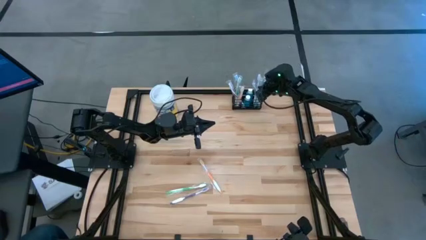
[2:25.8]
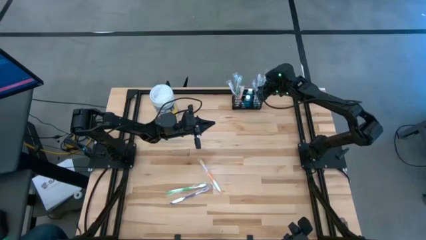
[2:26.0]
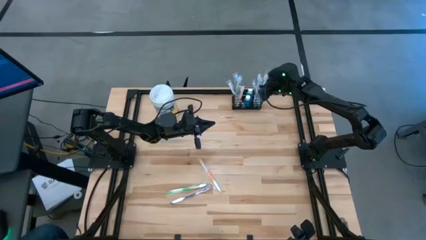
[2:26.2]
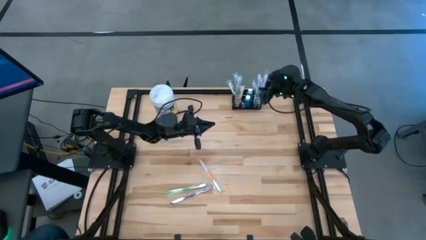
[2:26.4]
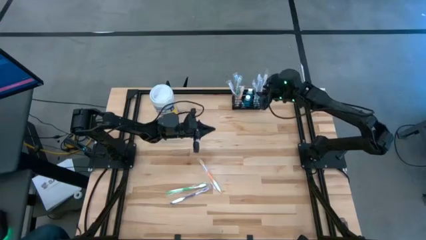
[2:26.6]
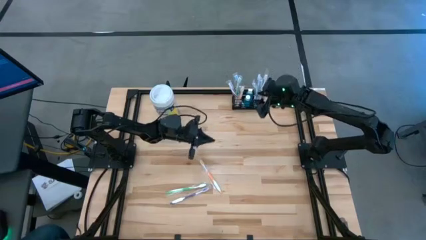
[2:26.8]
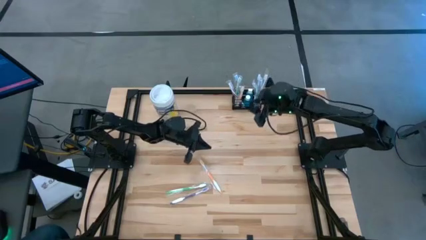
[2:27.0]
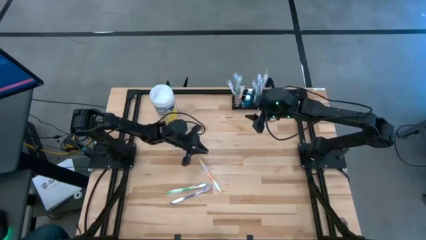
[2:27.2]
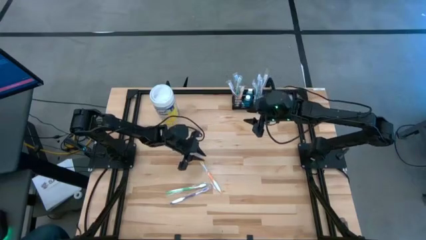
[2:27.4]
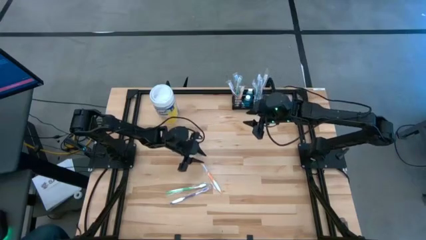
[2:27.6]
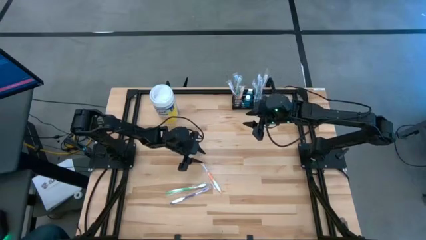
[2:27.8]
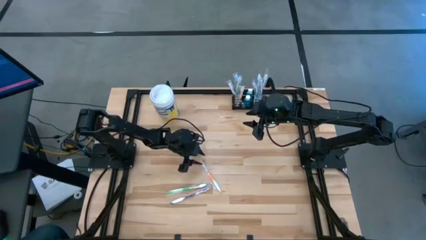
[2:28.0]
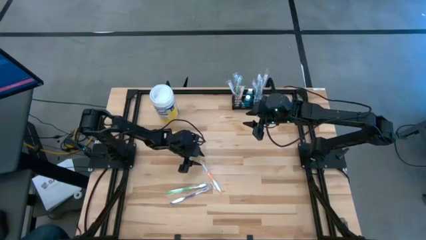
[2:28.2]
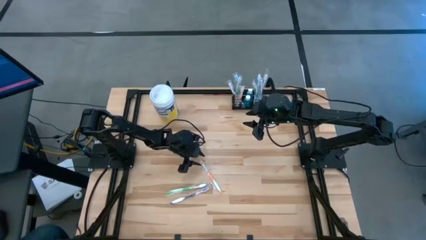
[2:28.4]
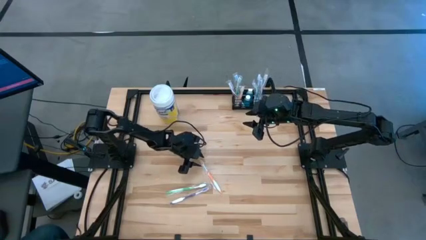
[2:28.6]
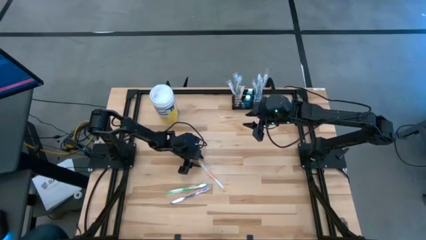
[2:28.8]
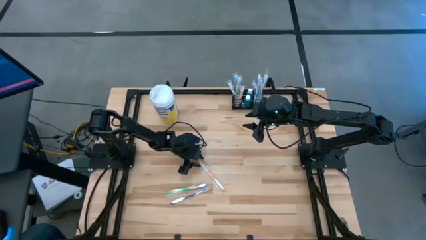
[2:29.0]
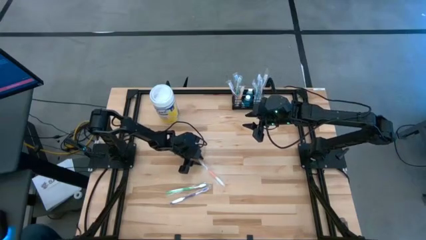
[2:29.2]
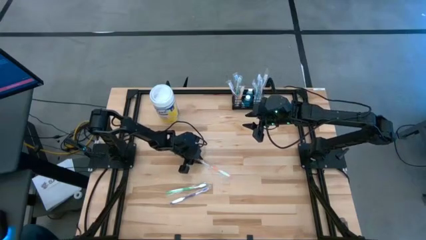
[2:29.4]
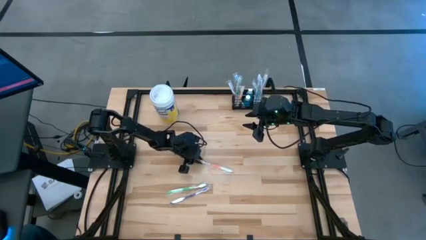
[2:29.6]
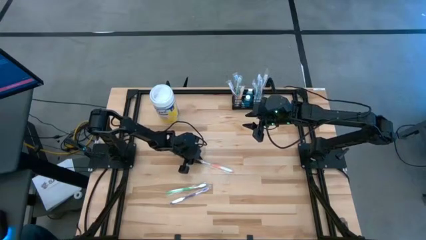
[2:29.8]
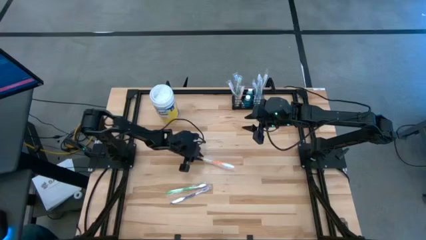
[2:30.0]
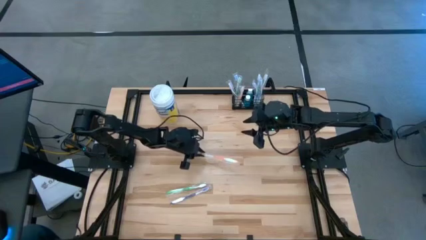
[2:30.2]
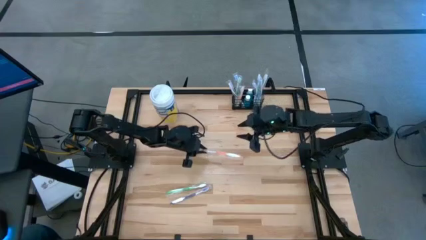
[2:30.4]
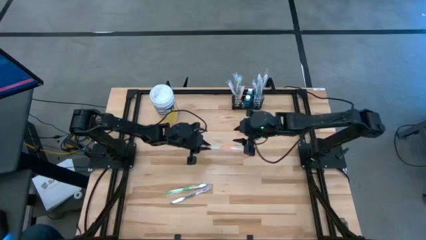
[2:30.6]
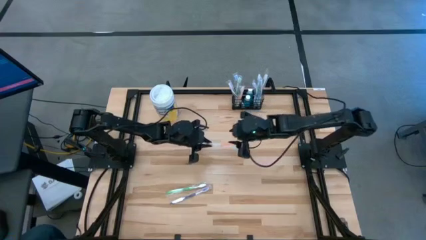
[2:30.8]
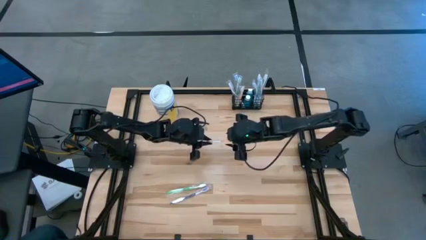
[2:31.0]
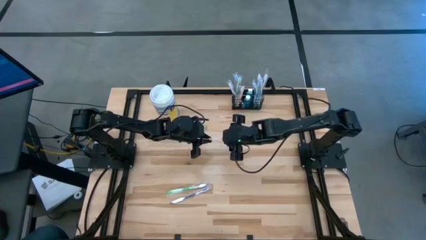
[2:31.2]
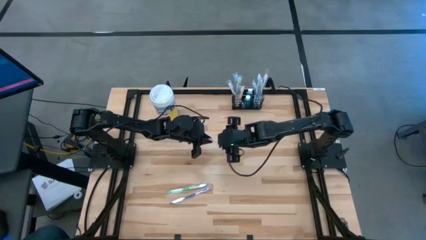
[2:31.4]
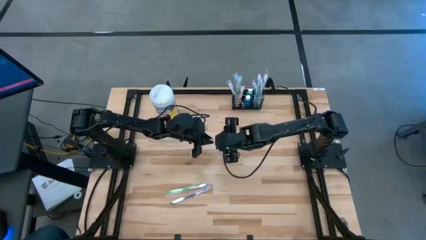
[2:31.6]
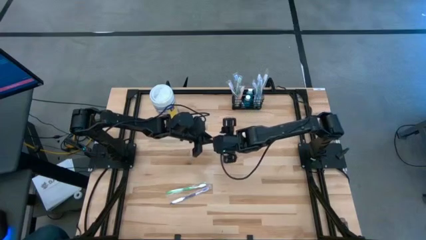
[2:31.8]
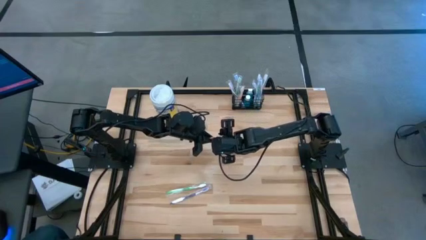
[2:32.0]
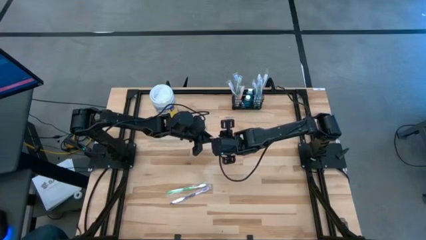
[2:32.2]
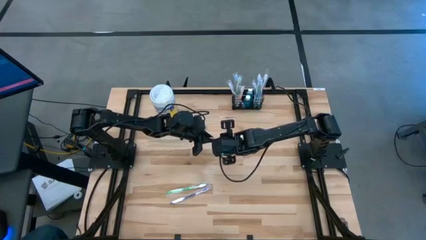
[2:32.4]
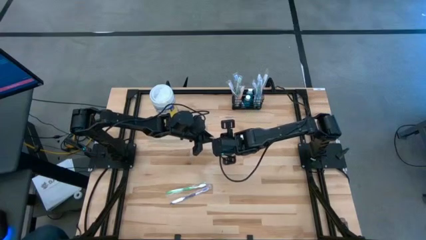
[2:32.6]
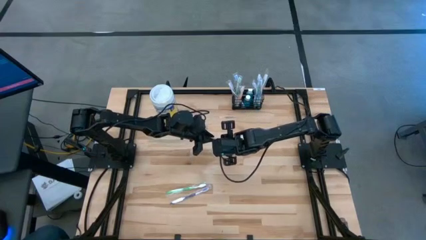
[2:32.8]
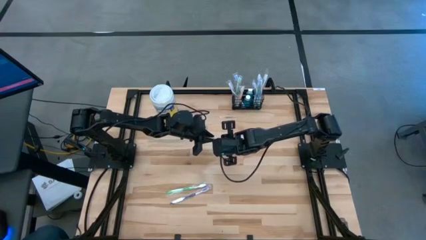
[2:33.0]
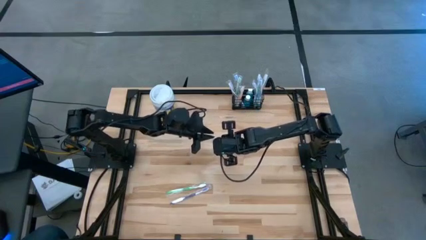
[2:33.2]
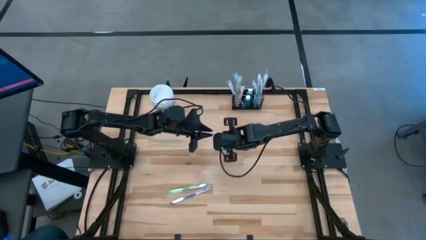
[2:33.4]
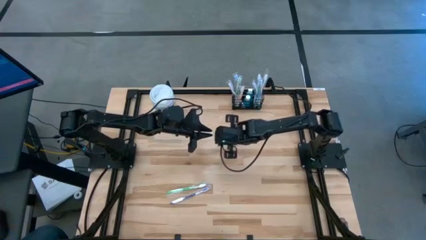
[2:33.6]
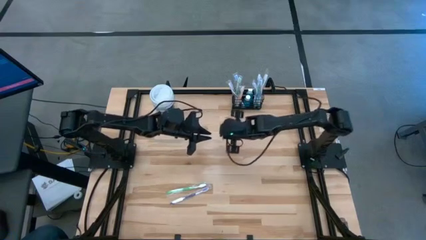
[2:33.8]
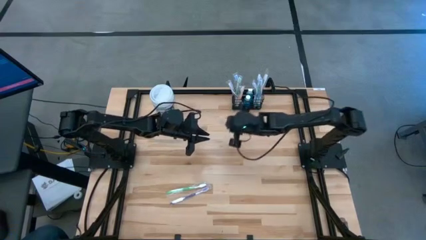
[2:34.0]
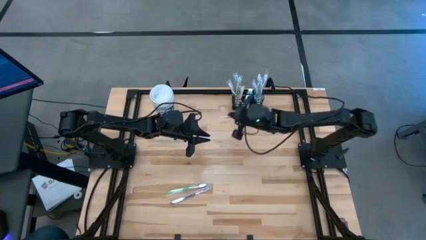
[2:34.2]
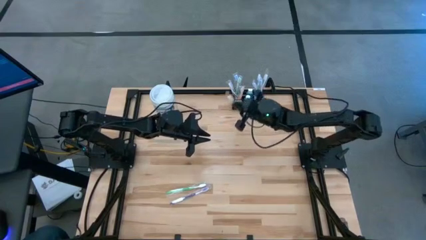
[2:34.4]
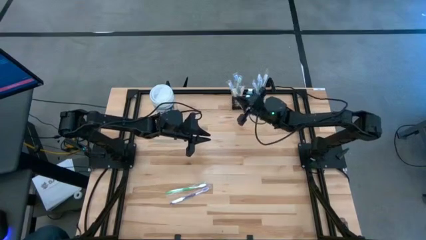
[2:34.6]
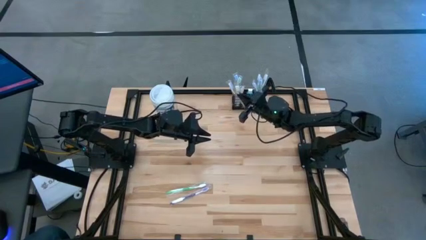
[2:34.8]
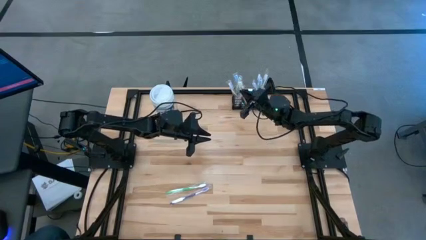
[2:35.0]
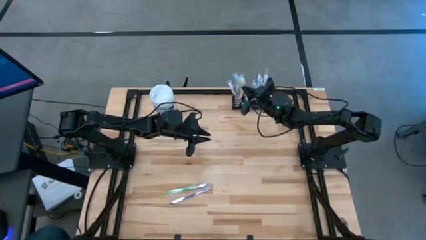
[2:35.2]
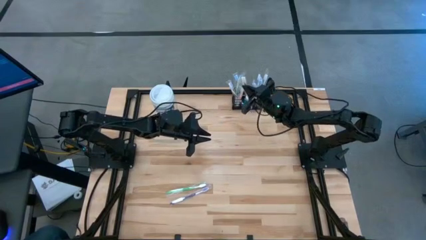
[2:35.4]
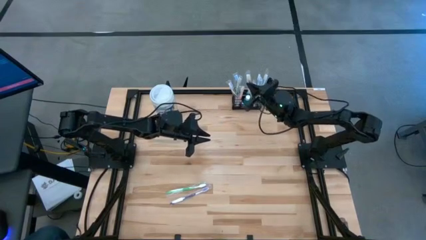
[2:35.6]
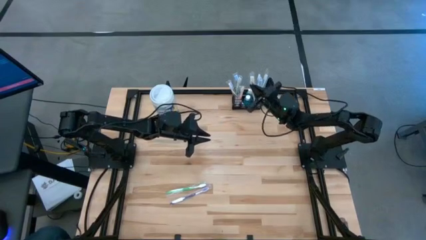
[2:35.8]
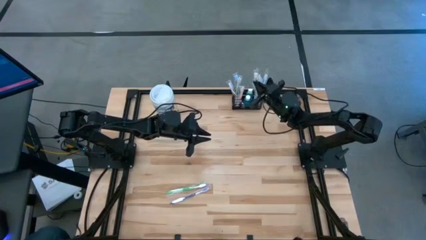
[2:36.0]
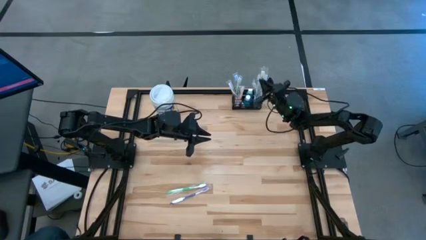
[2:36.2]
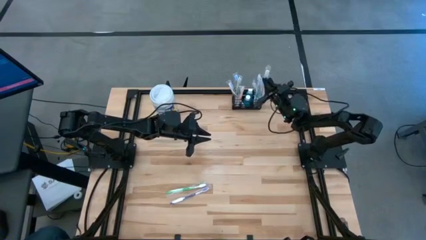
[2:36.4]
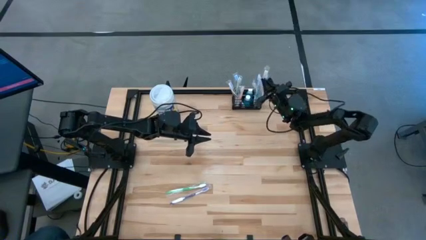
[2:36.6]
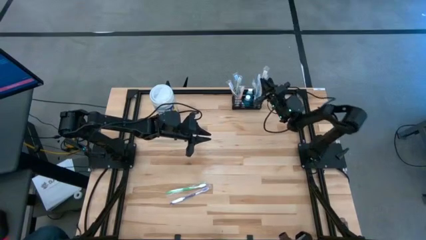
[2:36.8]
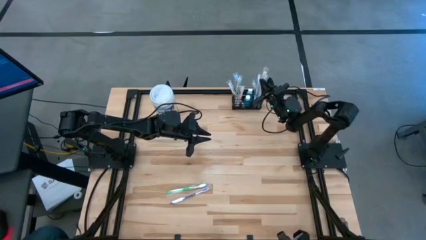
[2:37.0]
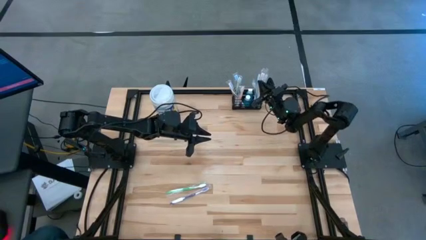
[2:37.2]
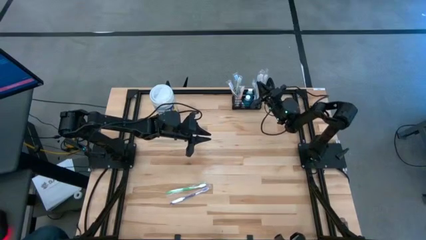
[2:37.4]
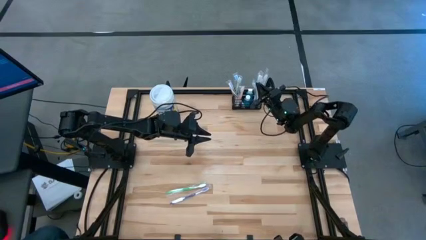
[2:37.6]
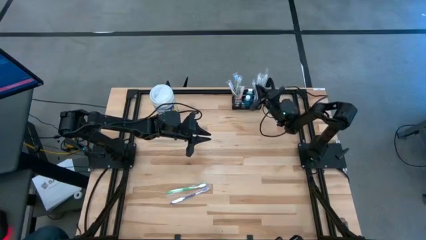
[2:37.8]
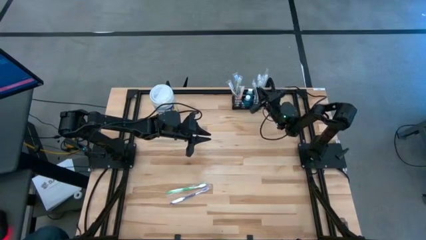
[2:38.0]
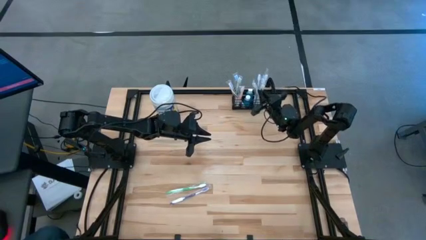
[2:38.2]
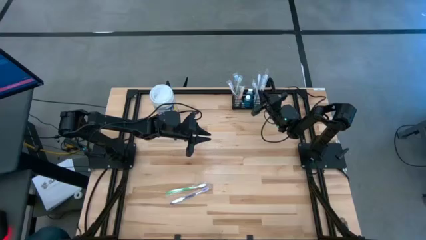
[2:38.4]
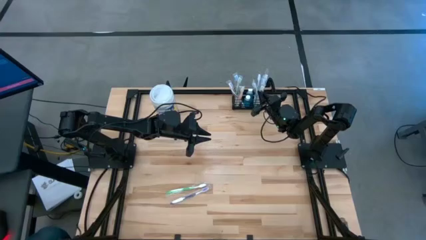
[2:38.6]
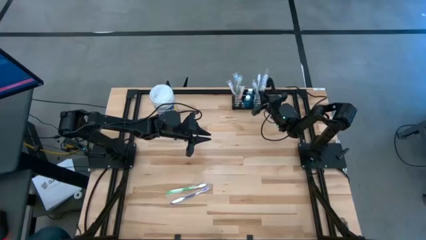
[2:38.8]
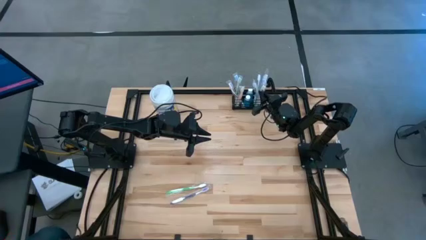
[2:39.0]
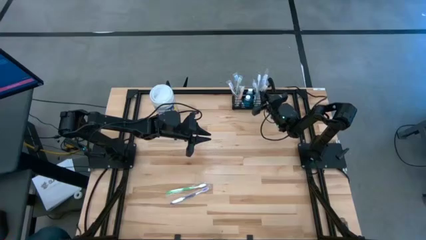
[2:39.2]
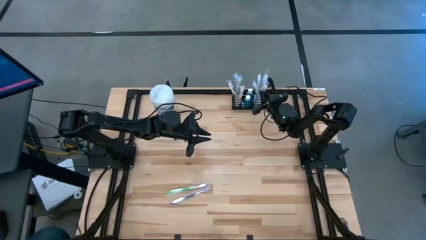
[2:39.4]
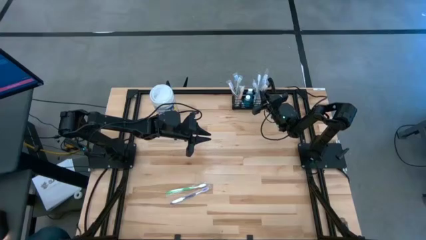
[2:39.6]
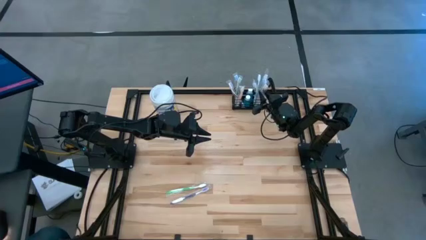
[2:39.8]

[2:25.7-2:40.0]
Task: Pick & Place toothbrushing station
Put the orange toothbrush into the black mesh organizer

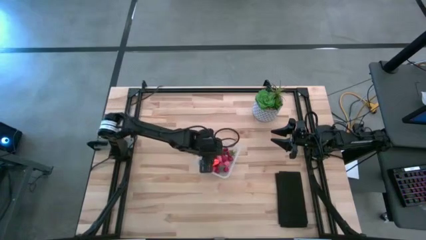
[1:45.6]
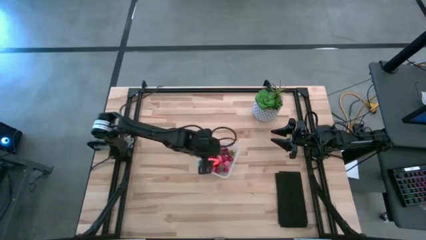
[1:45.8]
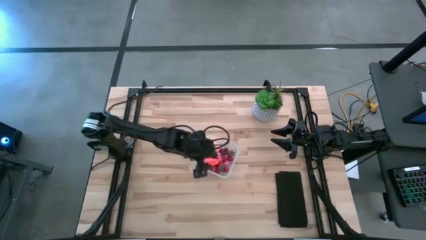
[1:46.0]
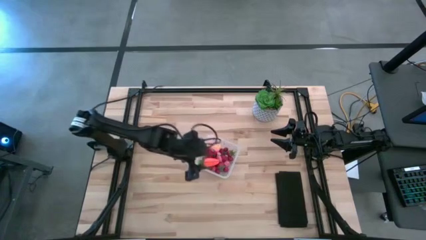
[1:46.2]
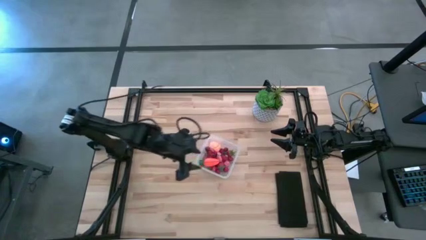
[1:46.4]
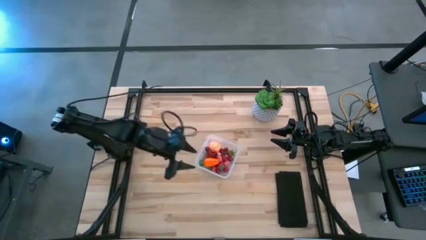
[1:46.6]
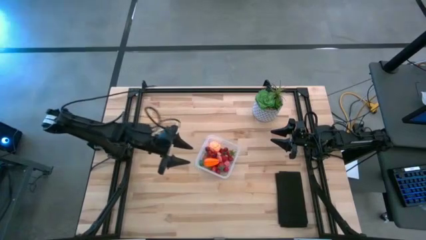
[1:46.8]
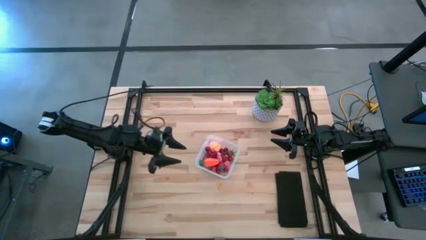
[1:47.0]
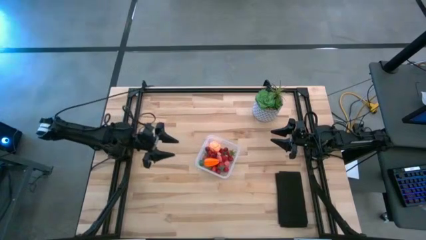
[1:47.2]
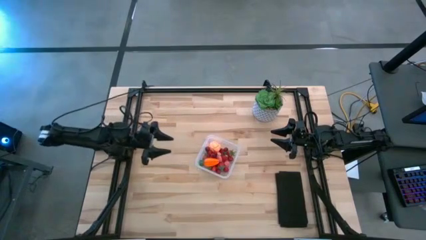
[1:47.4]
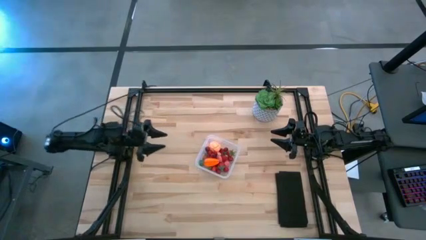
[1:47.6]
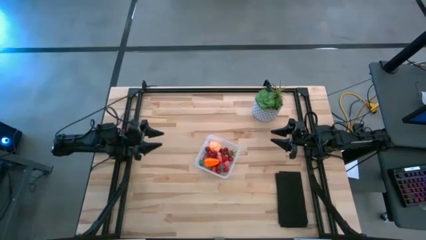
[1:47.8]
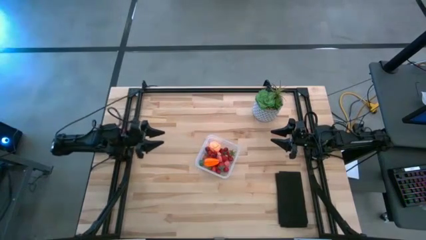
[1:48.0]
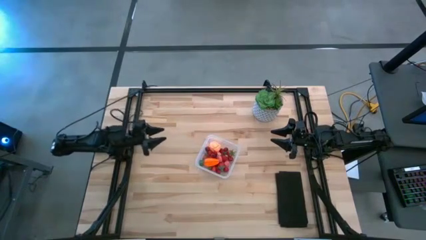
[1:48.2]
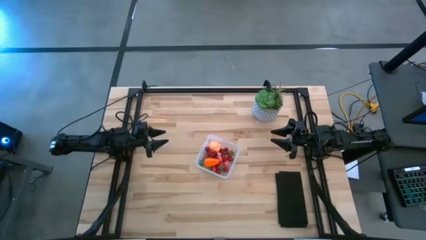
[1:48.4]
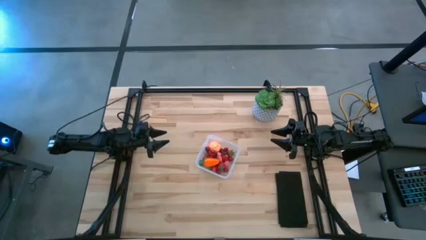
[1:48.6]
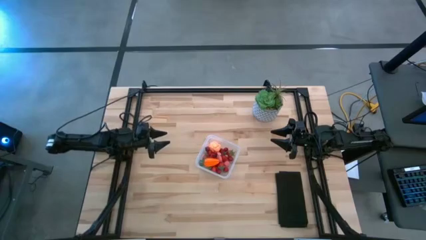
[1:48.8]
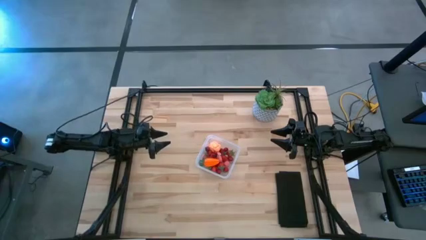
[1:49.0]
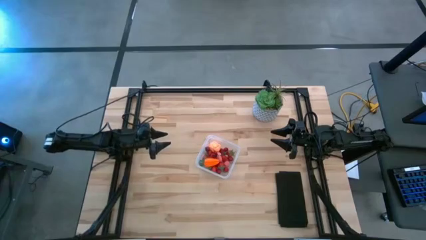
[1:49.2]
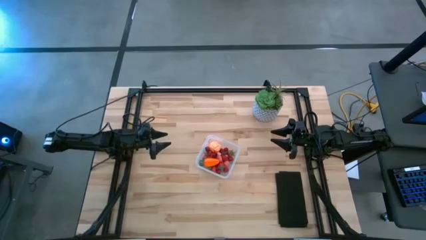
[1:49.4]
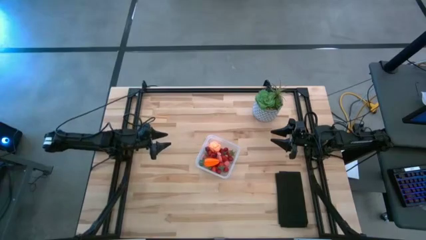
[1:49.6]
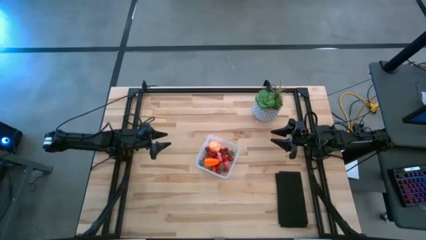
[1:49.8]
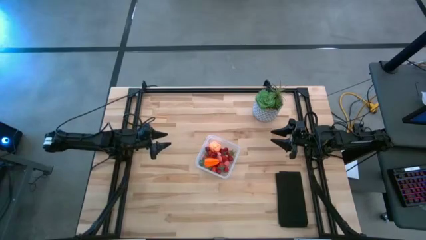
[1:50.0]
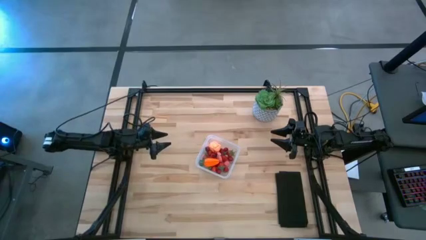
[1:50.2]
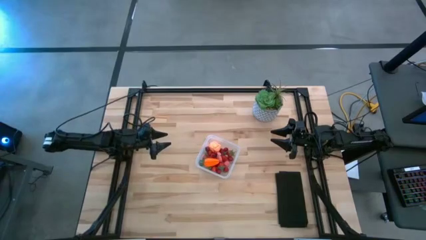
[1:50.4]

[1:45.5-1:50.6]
Task: Pick and placing Produce into tupperware
Return to Home Position
